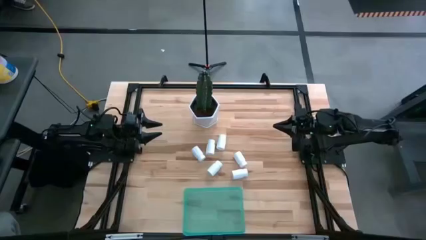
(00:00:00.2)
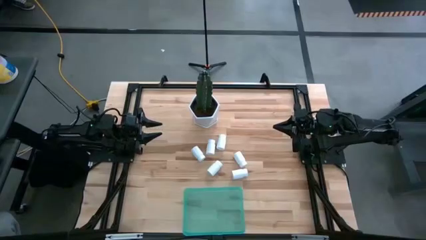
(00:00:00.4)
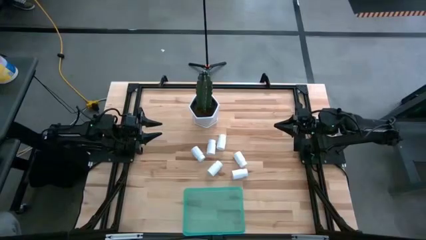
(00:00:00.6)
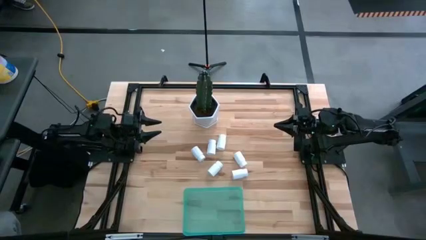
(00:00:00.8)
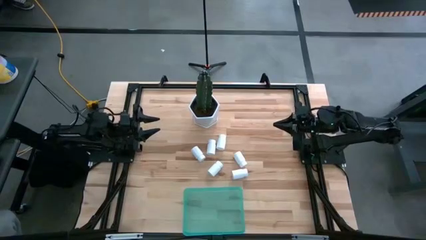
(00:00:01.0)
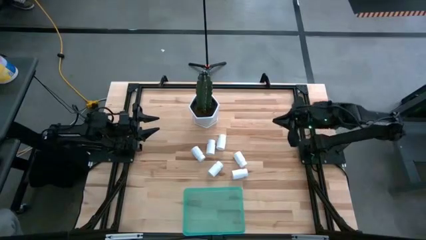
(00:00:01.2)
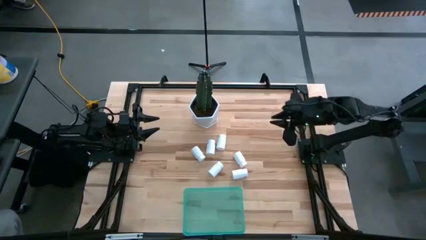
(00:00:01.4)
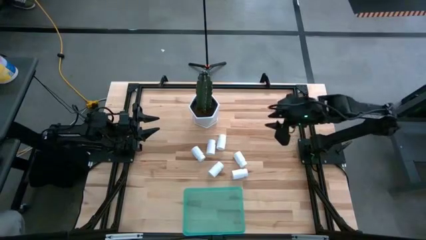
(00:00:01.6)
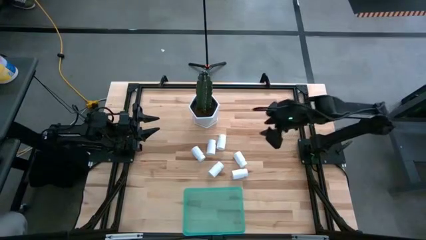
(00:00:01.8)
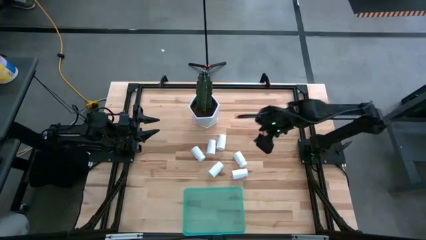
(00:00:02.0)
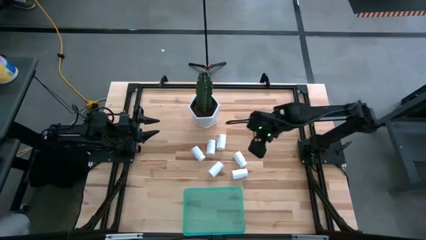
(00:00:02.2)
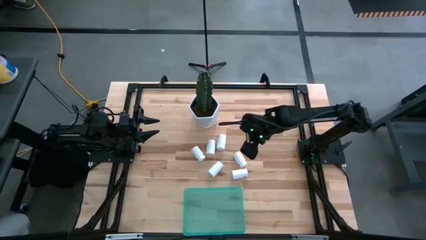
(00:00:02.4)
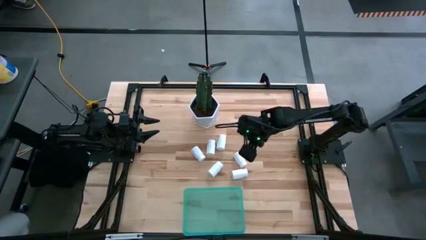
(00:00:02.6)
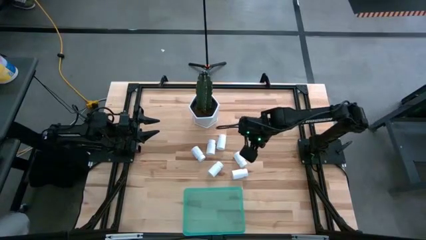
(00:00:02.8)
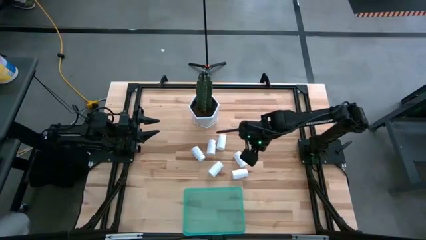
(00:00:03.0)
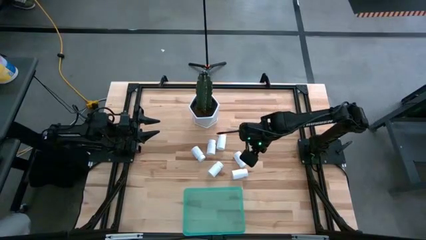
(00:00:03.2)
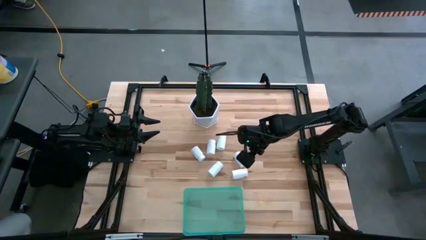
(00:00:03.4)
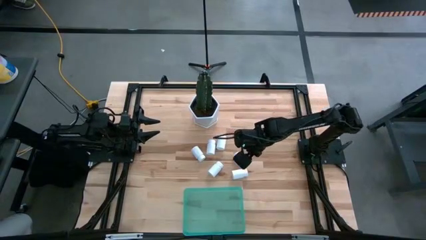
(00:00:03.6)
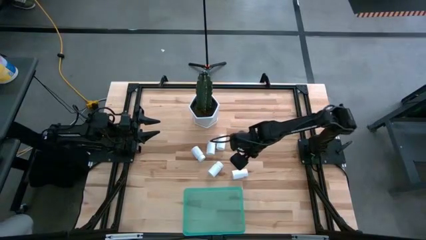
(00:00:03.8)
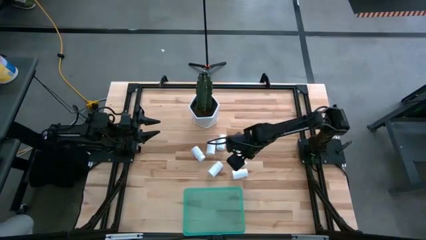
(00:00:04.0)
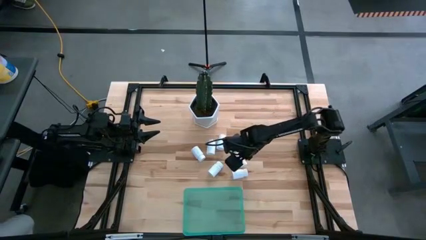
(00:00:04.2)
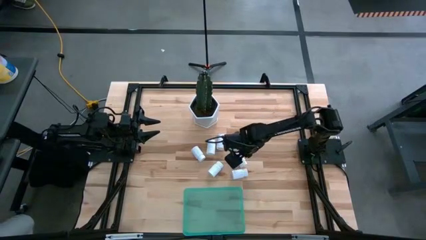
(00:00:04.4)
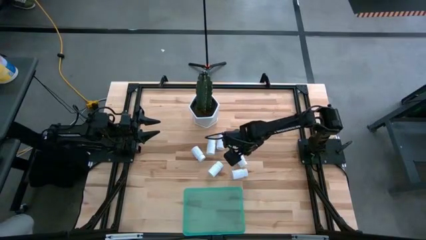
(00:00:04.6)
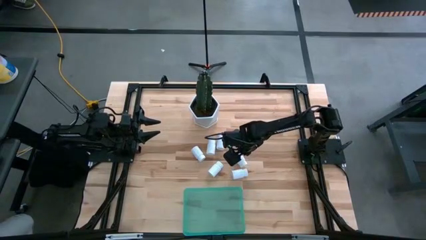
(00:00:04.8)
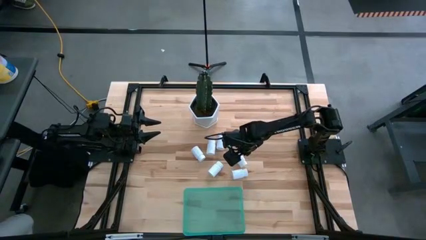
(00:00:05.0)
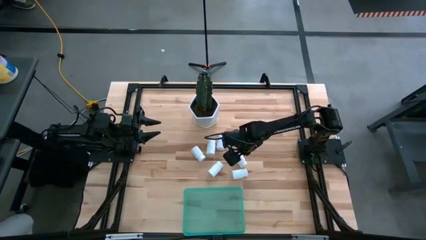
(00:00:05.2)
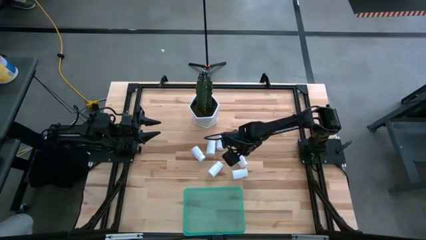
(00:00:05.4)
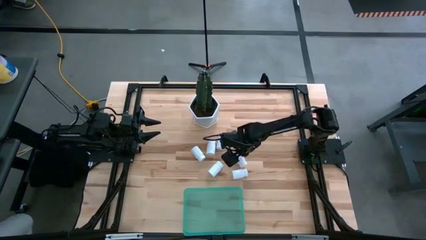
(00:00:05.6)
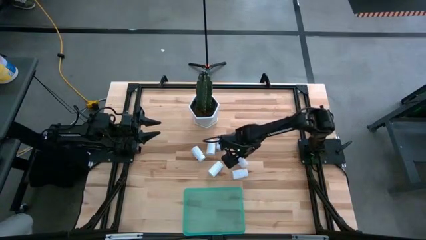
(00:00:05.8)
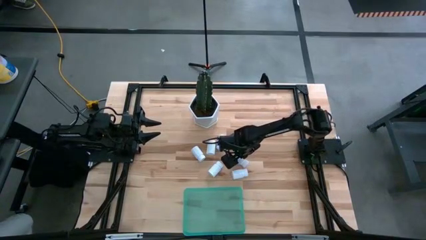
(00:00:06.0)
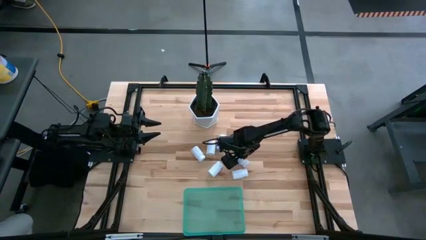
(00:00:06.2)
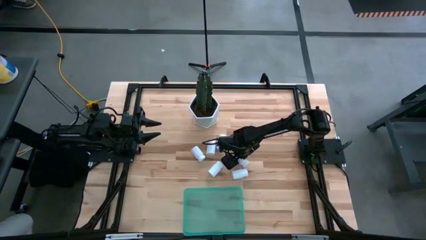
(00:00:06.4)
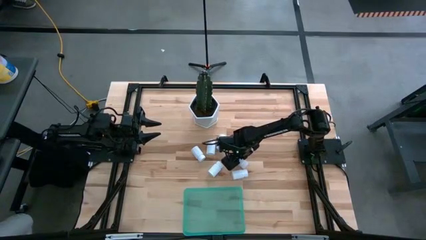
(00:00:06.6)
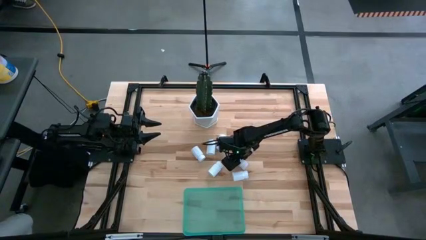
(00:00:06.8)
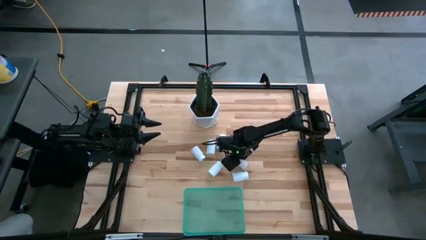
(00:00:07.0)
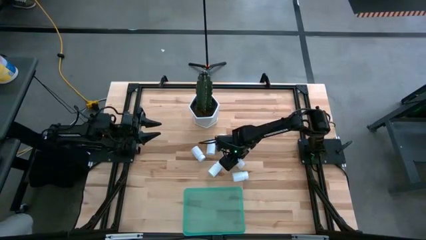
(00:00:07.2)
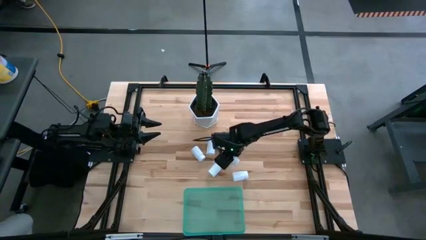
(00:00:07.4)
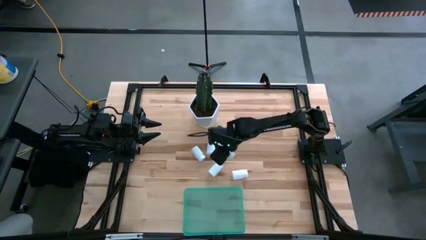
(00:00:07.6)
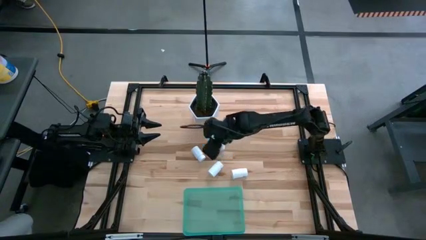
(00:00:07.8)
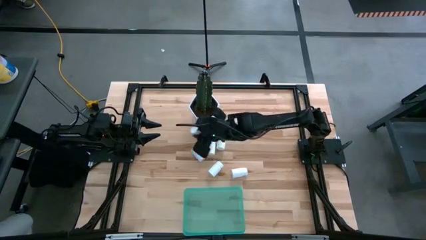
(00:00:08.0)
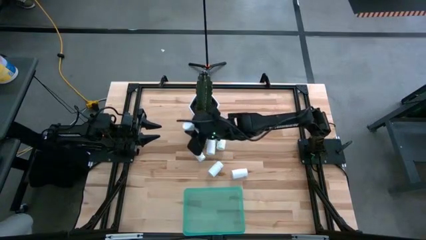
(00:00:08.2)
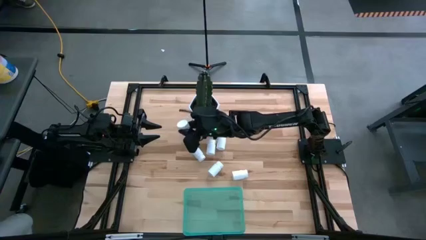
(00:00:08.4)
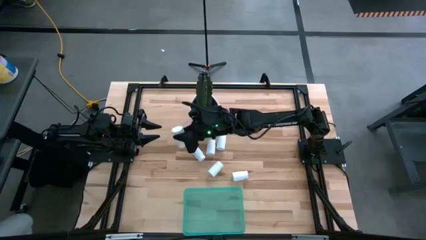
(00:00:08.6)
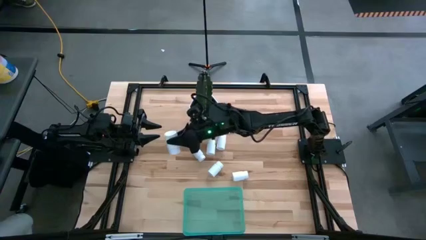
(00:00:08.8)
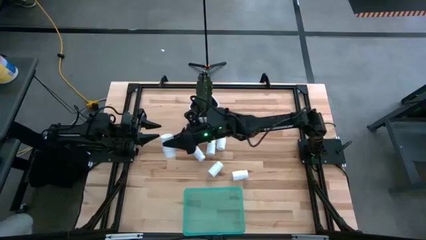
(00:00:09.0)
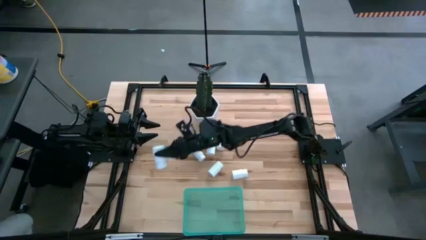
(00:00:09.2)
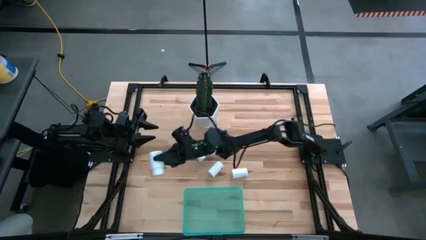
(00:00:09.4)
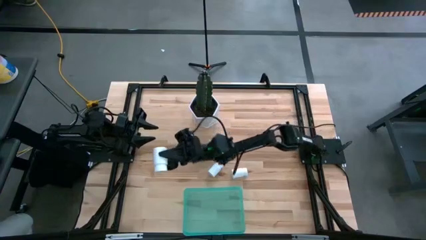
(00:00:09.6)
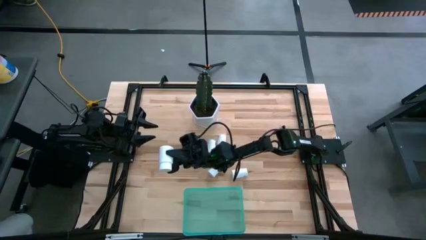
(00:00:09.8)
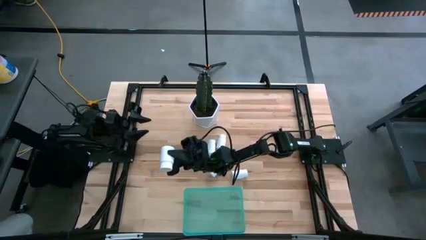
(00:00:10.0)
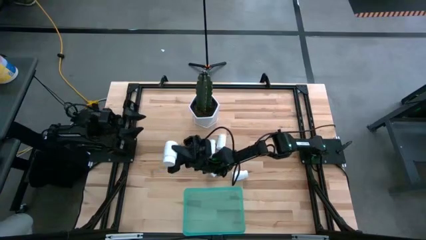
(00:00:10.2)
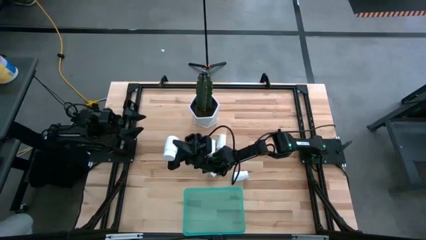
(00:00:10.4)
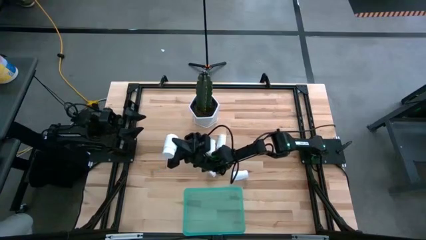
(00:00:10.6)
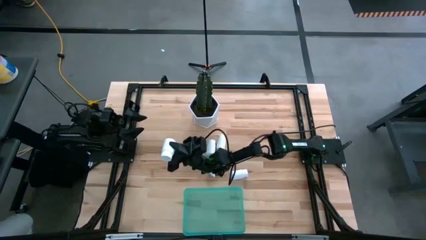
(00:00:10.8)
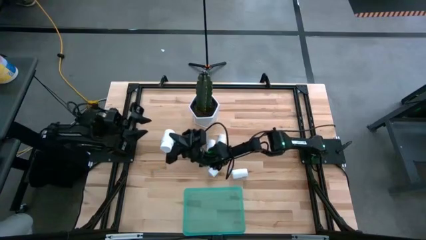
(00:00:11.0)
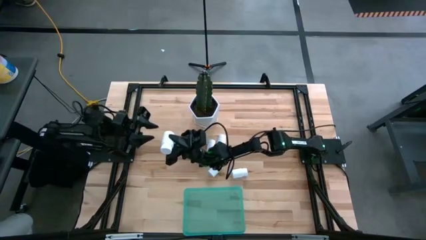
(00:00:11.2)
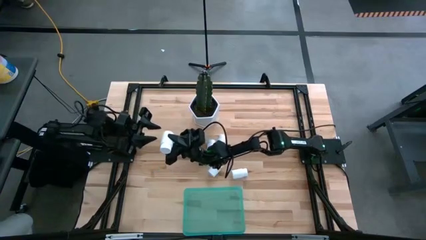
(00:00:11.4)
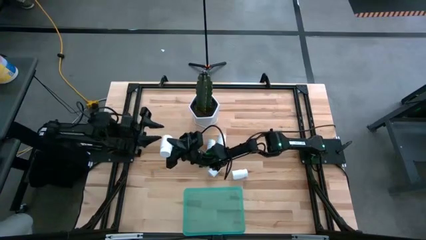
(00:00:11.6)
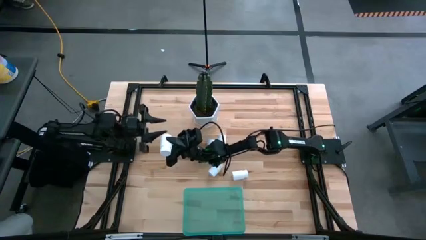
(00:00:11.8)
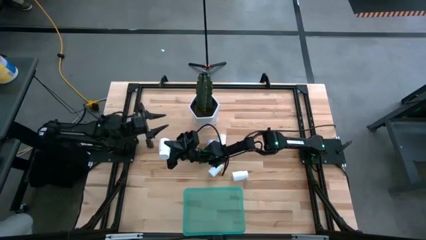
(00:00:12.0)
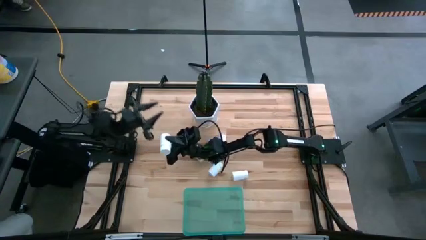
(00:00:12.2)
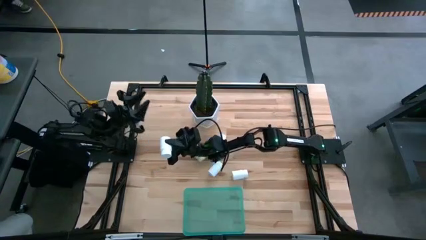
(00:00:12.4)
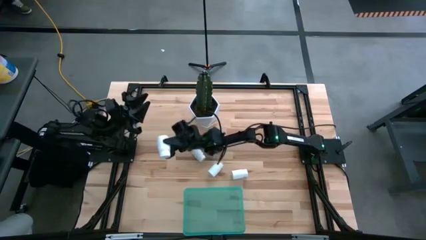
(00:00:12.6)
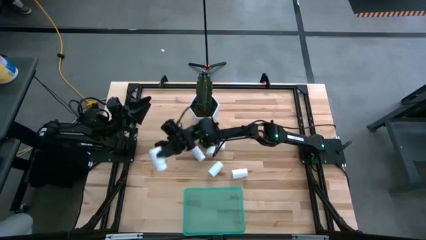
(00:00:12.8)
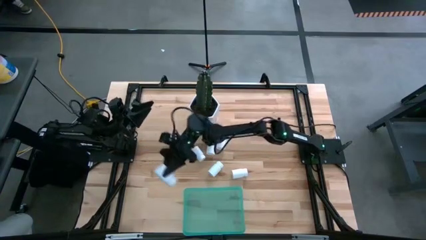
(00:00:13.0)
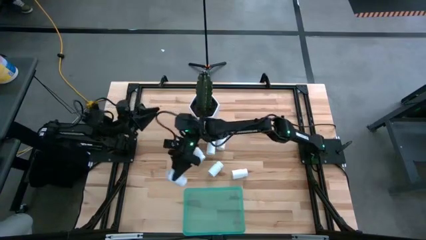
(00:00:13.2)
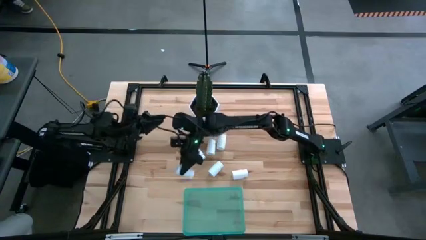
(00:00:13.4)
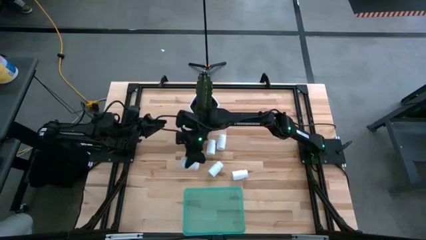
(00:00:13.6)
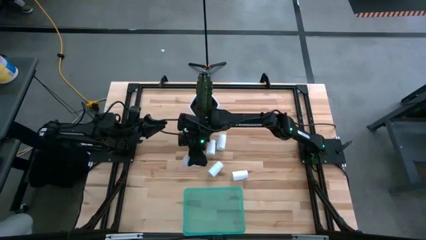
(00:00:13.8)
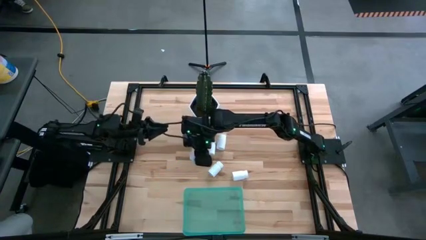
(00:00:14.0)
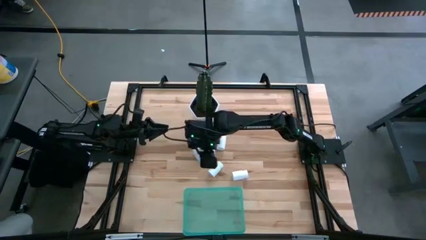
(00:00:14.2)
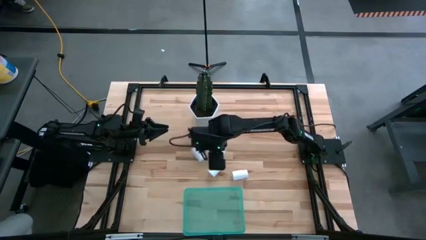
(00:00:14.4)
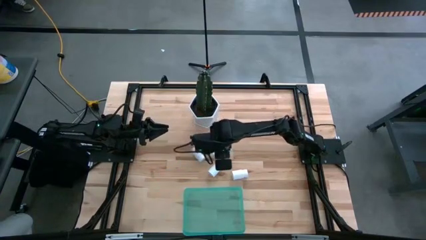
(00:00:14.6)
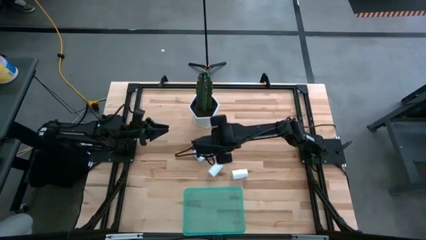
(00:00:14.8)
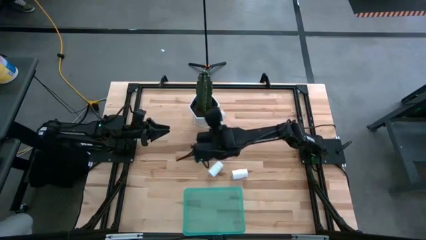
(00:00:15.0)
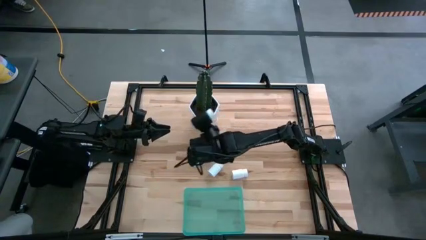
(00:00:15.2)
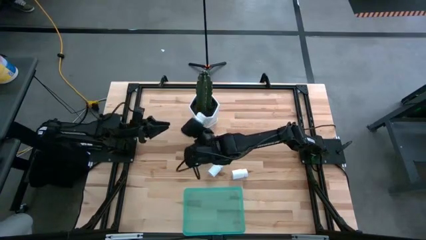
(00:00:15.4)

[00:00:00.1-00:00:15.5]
Task: Pick and place pill bottles into a basket
Put the white pill bottle into the bin
